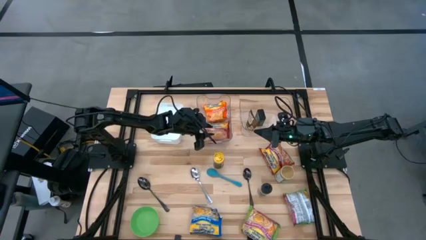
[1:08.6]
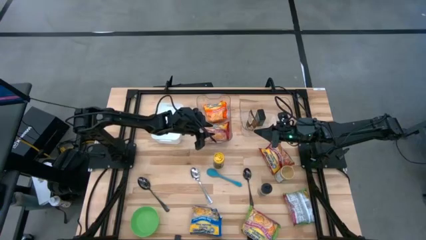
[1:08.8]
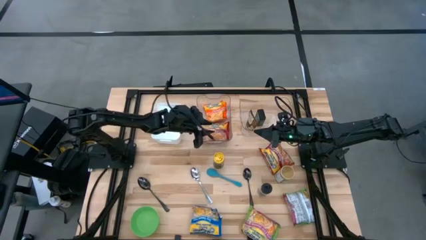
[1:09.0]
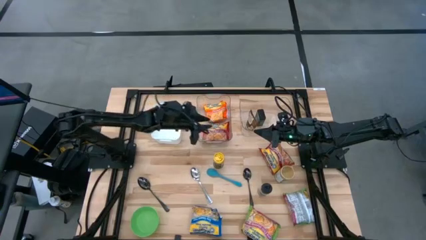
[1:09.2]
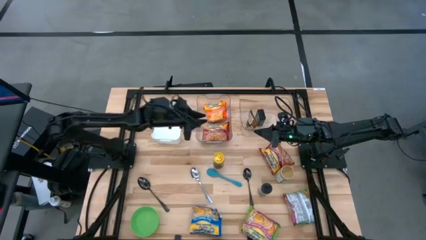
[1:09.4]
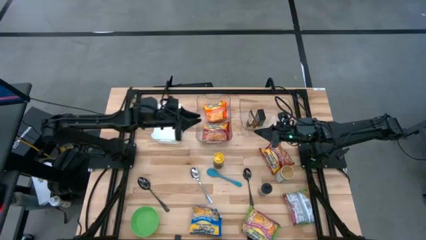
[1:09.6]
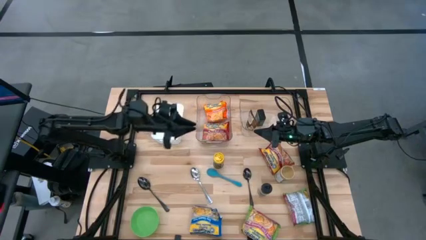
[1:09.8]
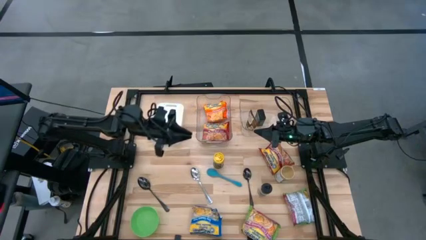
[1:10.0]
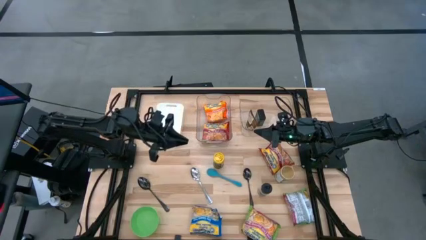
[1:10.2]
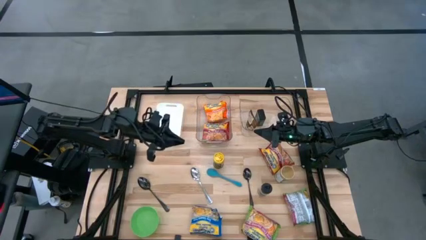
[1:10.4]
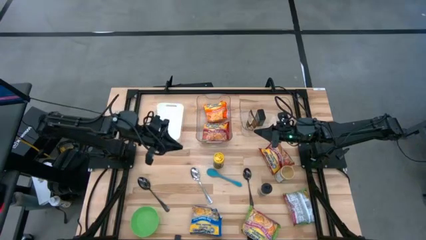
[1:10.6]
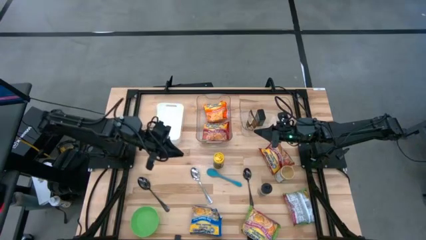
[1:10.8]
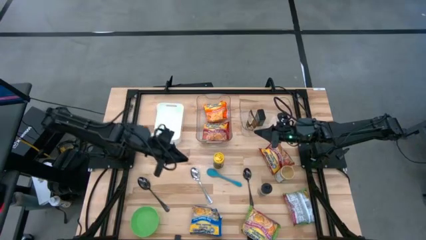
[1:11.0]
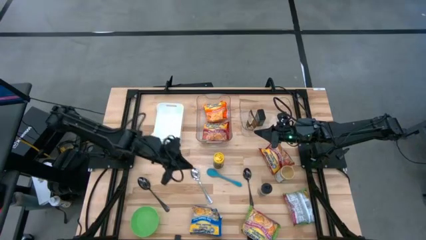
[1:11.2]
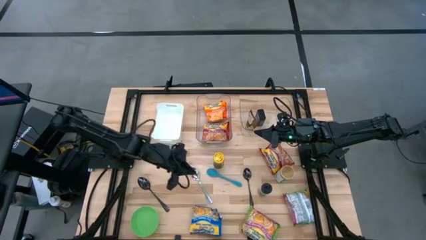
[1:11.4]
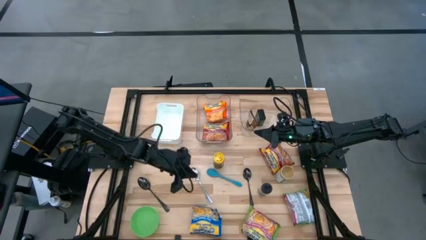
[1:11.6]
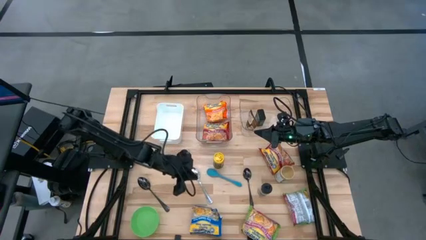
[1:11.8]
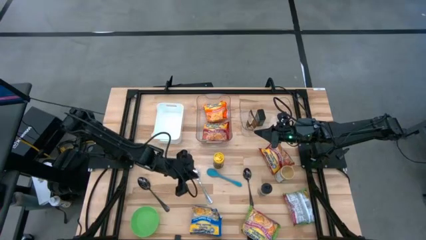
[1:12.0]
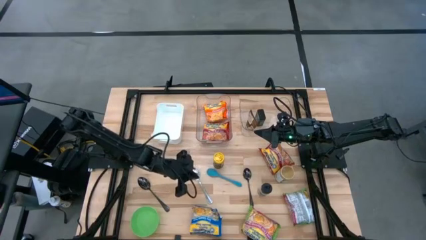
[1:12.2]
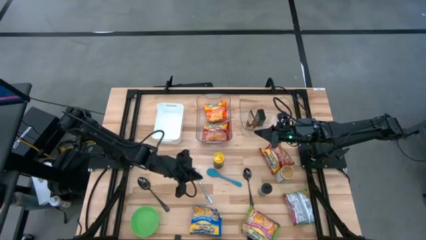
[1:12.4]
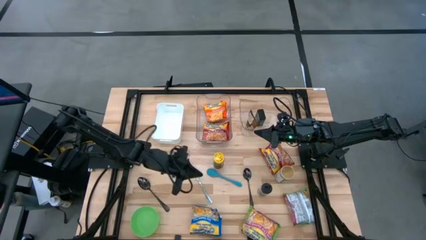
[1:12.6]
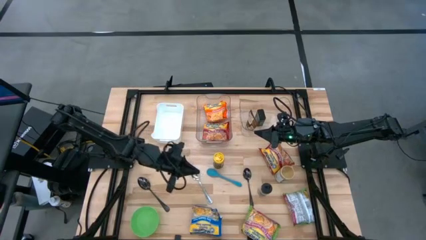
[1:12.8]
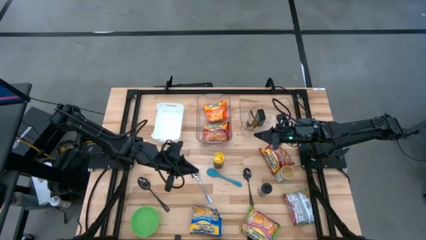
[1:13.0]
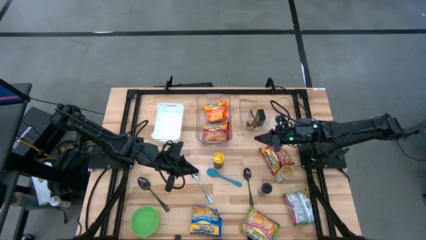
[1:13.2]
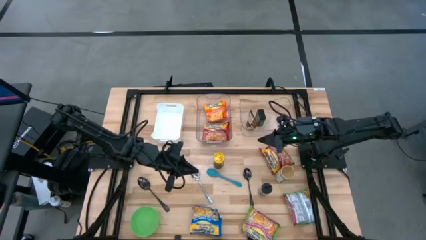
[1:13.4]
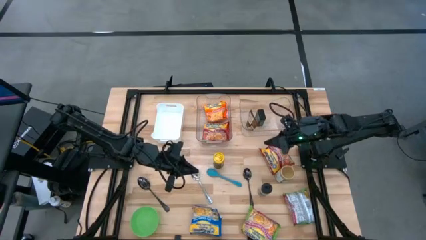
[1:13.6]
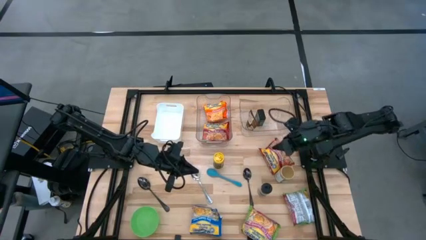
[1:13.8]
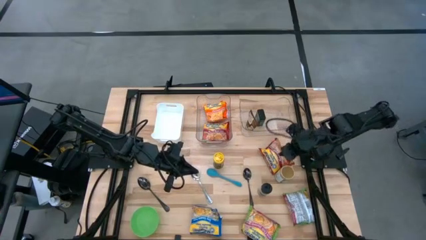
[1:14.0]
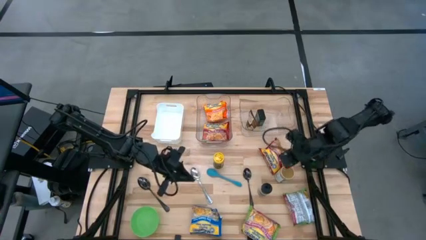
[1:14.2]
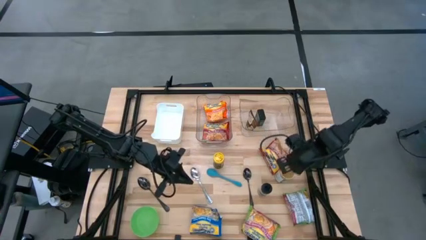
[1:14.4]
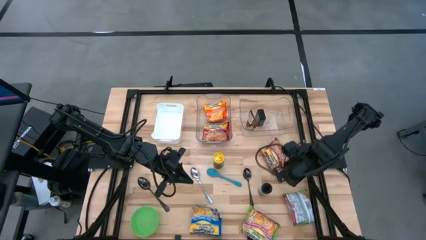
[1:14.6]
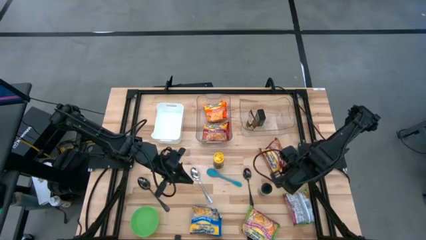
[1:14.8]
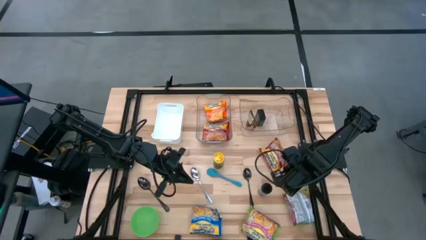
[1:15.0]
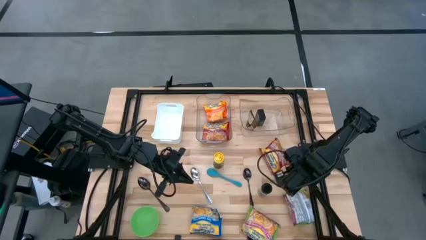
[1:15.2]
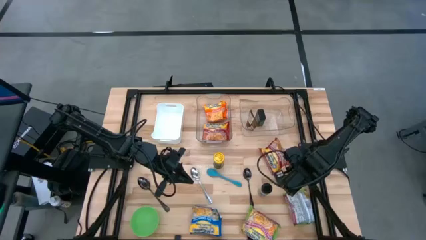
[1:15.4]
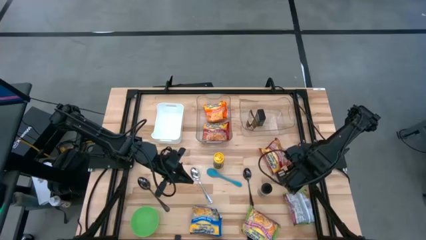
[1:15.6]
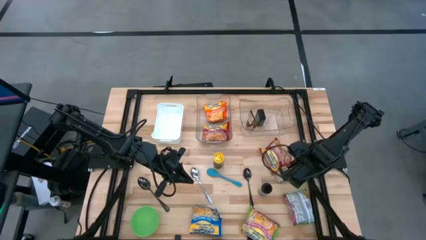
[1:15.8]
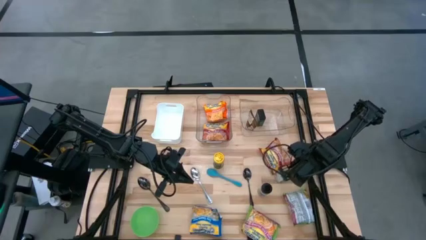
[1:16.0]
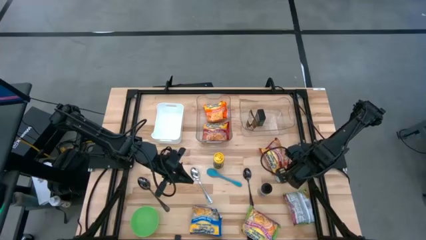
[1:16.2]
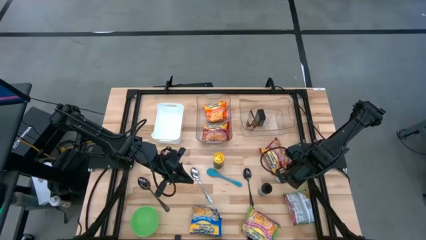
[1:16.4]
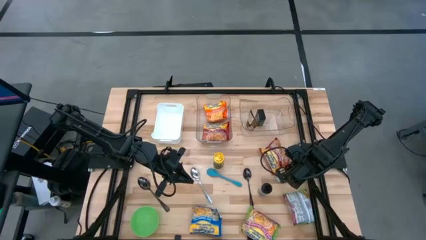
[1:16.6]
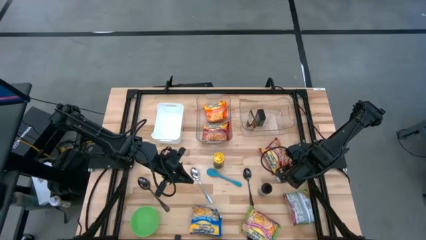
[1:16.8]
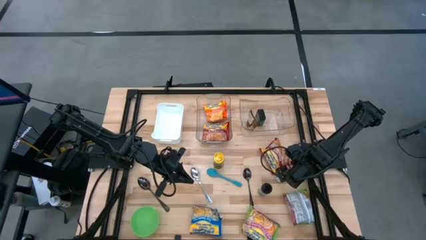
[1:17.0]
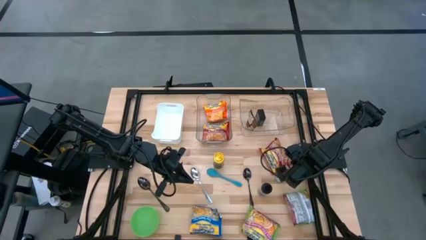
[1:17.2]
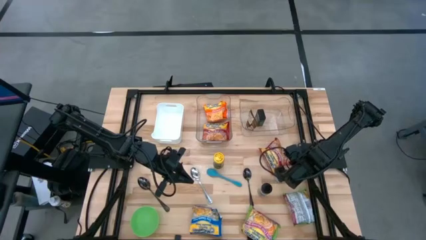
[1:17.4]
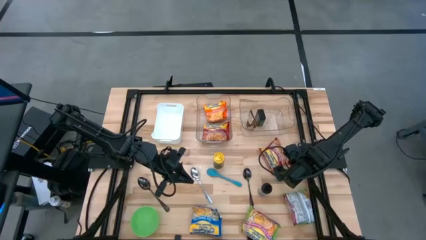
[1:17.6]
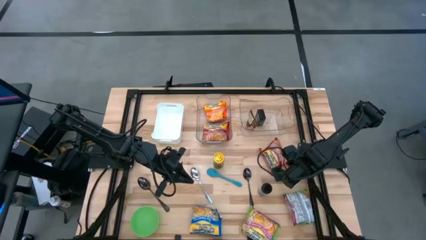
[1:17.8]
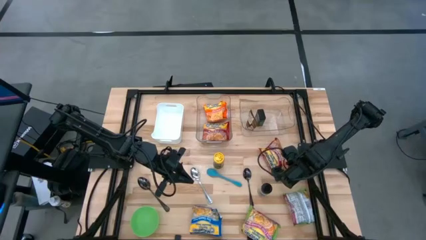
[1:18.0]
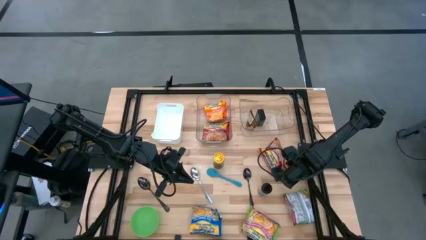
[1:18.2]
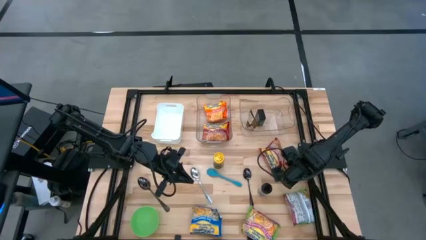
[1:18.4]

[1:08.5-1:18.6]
Task: Pick & Place Food Item
Put the gold spice bottle into the right transparent bin

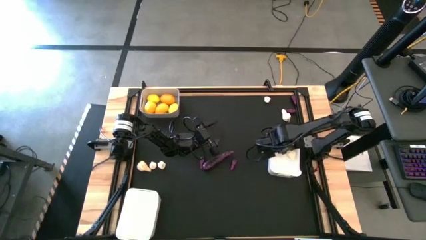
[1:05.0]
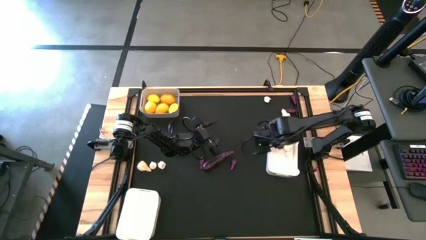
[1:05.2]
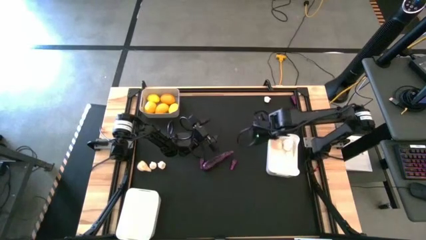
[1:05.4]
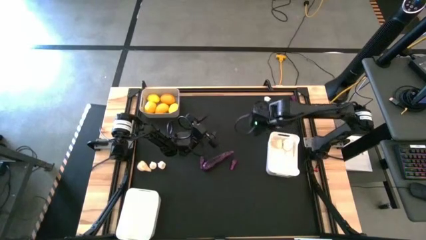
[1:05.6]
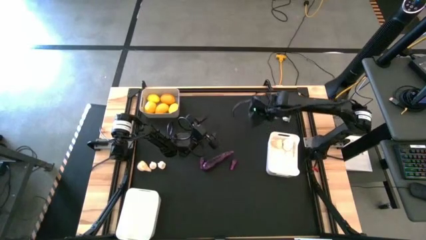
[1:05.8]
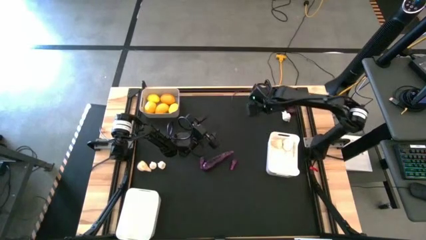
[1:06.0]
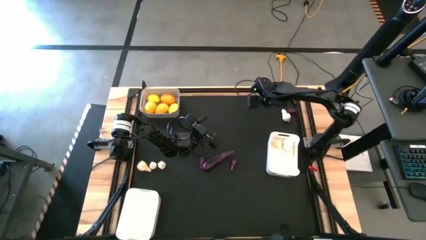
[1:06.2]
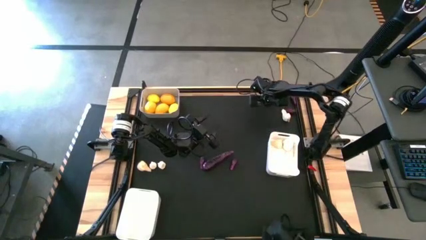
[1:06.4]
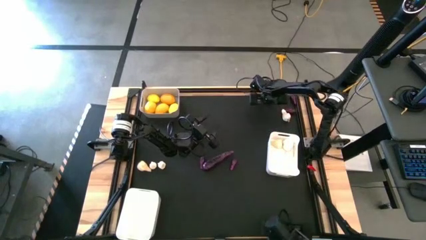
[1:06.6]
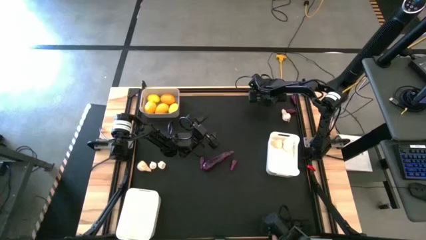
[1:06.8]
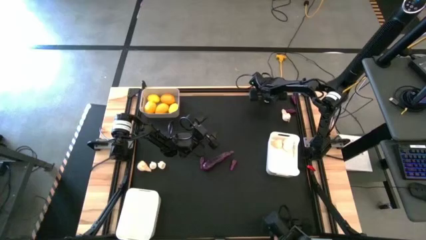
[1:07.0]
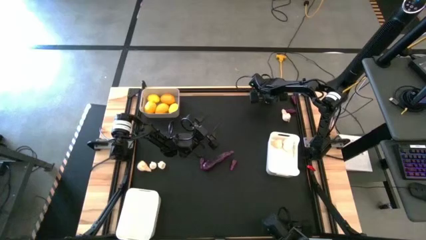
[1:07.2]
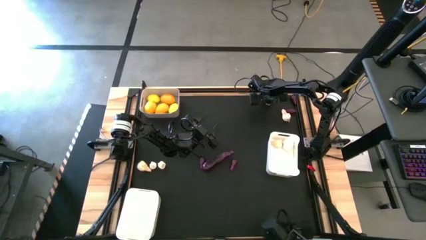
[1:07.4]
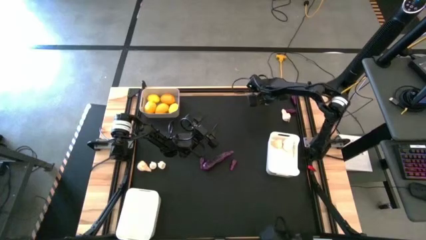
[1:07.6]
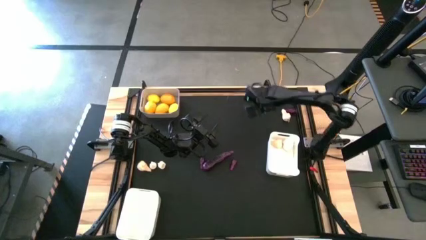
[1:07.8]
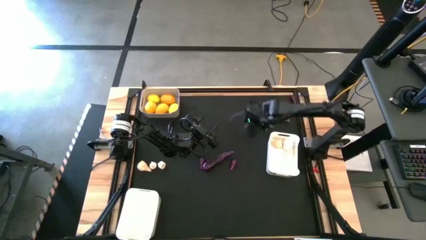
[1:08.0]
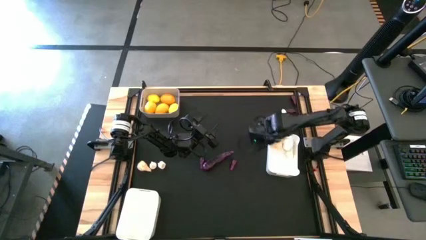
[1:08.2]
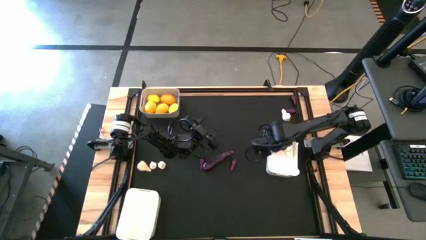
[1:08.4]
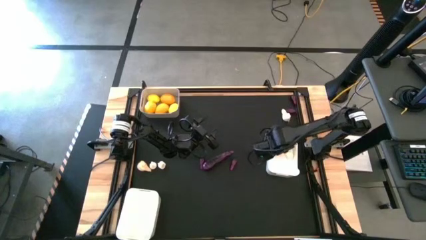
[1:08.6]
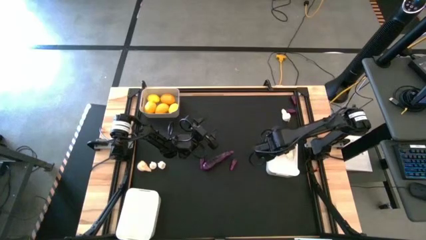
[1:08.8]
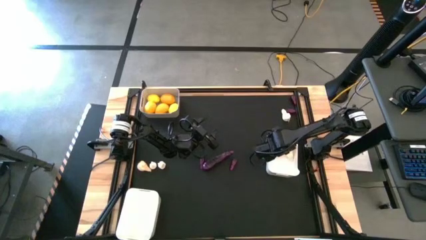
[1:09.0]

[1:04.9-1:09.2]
Task: Sort produce into baskets
Put the top right garlic into the middle right white bin

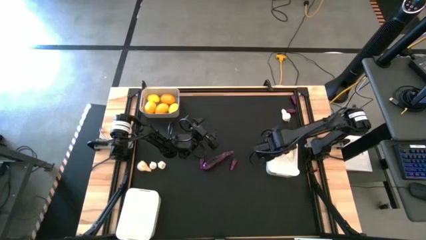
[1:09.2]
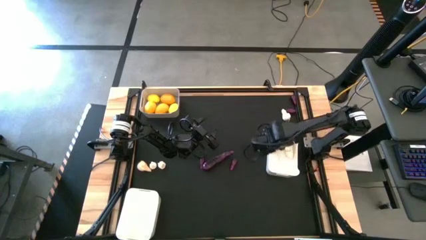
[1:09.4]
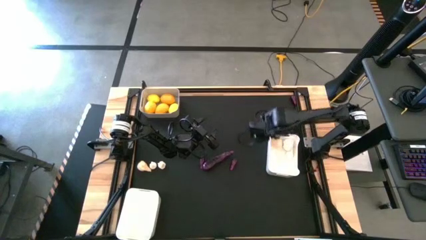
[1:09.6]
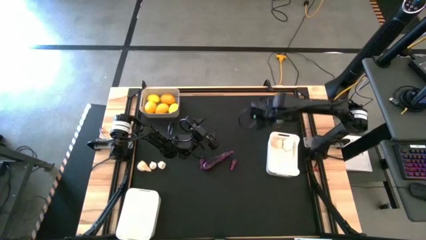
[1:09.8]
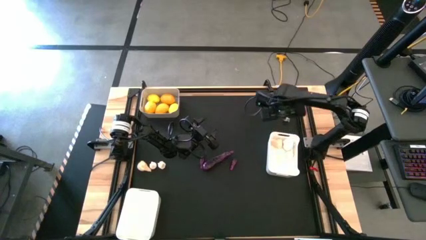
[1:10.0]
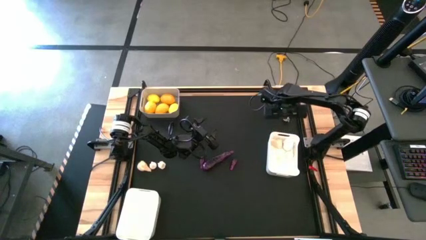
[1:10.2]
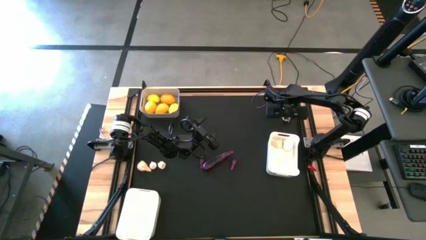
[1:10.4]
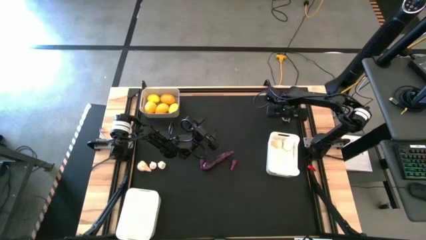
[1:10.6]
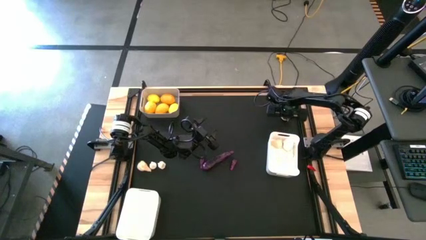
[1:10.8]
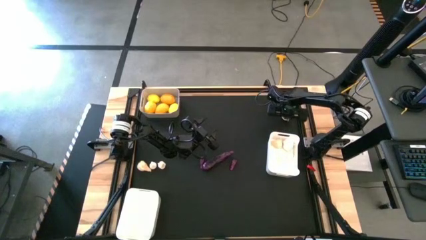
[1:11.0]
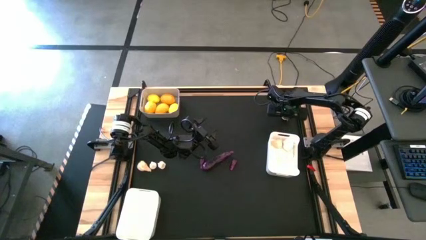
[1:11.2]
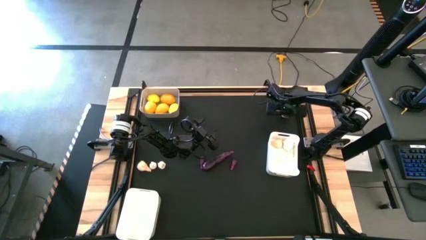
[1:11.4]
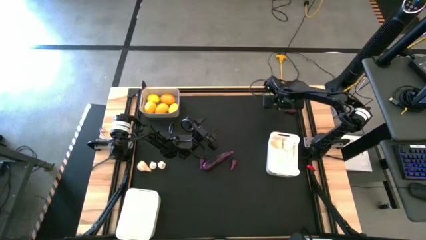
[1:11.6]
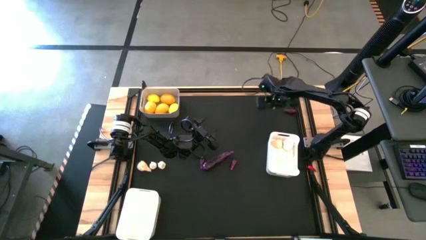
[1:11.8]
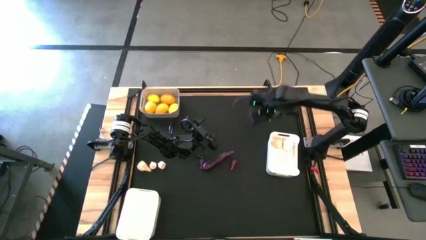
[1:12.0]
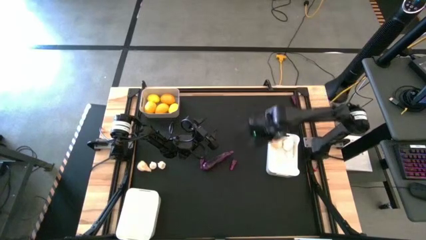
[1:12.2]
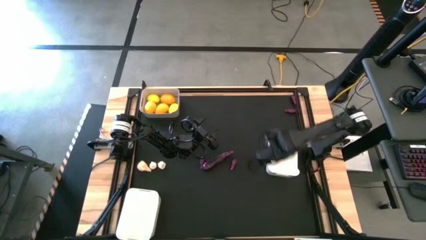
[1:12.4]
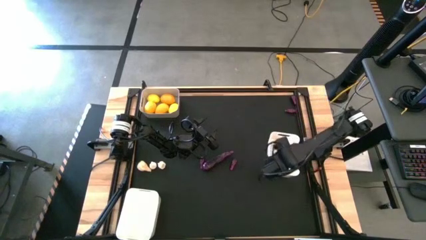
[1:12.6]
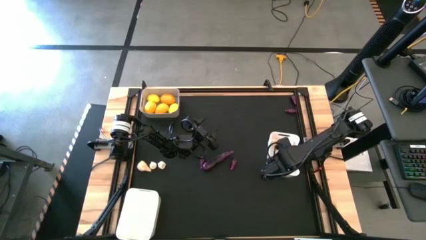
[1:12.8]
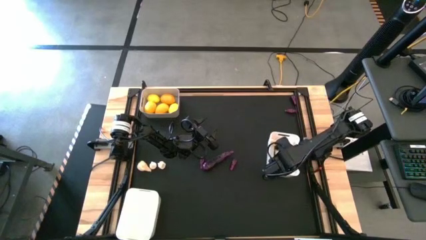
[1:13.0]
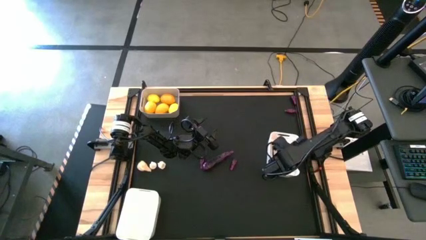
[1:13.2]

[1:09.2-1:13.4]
Put the top right garlic into the middle right white bin
